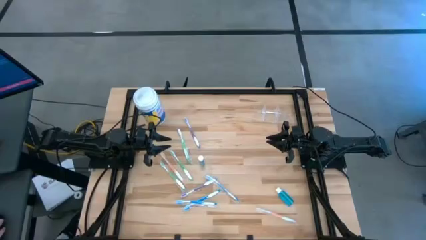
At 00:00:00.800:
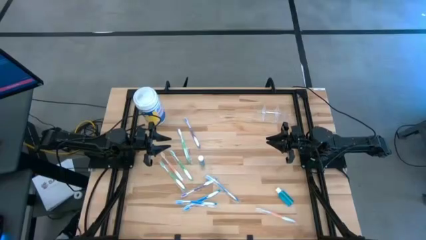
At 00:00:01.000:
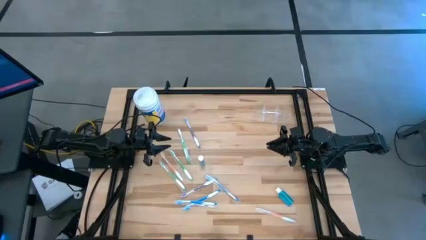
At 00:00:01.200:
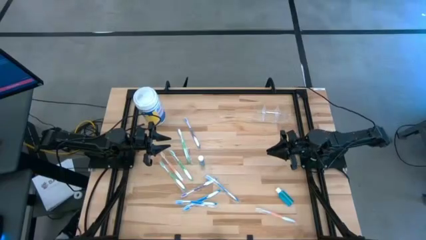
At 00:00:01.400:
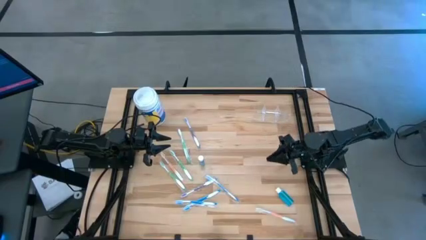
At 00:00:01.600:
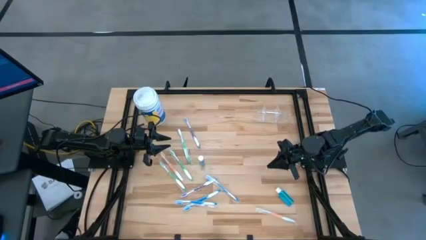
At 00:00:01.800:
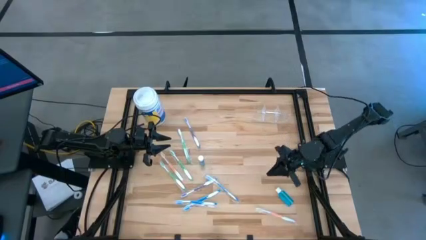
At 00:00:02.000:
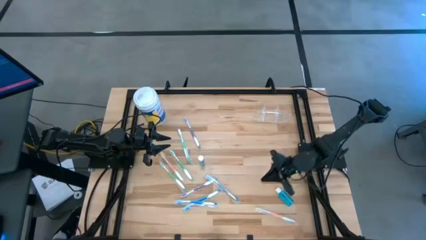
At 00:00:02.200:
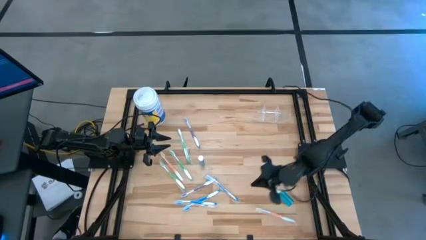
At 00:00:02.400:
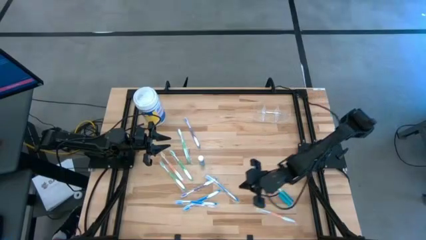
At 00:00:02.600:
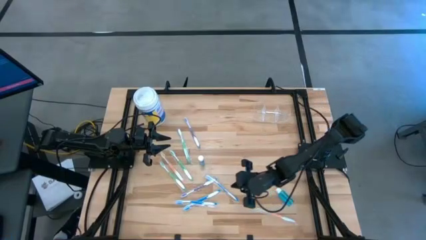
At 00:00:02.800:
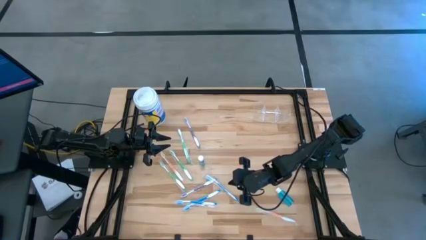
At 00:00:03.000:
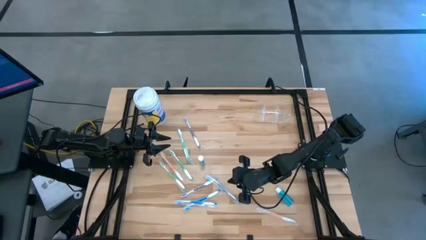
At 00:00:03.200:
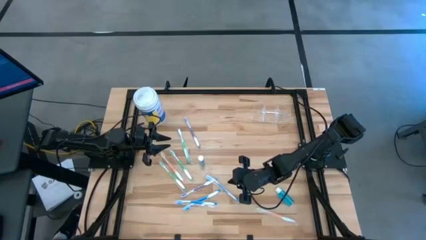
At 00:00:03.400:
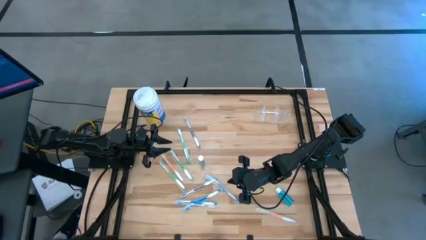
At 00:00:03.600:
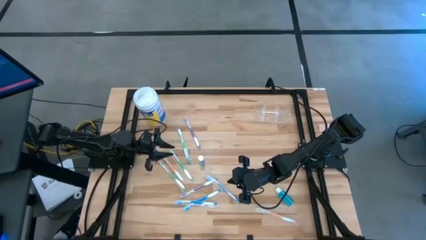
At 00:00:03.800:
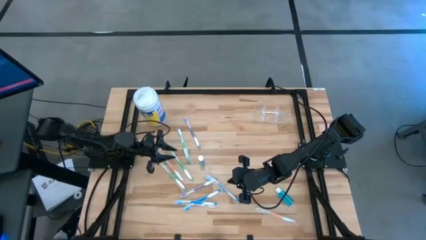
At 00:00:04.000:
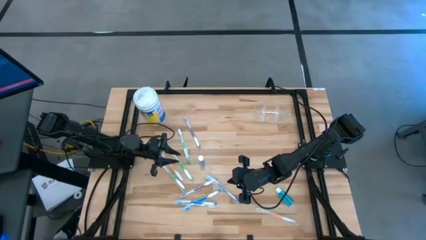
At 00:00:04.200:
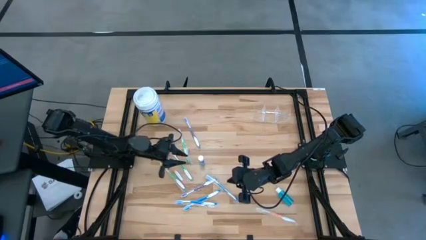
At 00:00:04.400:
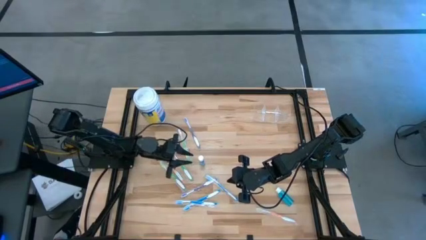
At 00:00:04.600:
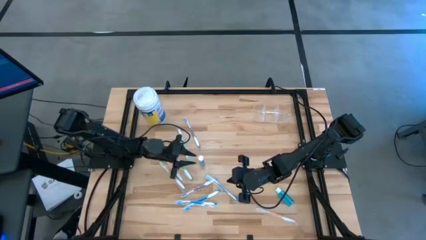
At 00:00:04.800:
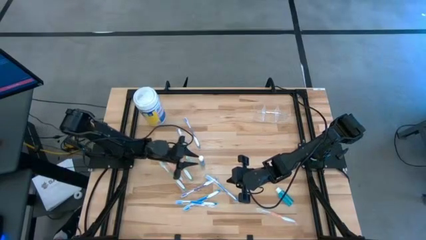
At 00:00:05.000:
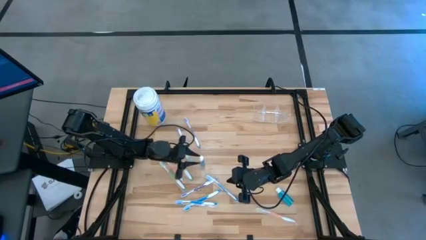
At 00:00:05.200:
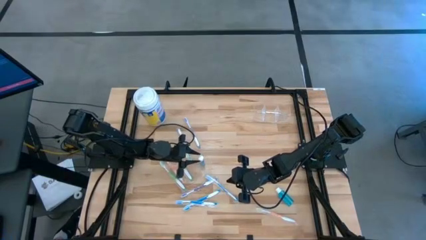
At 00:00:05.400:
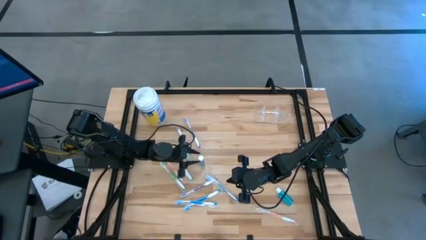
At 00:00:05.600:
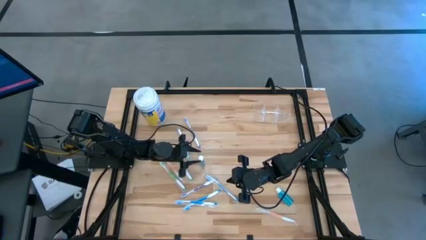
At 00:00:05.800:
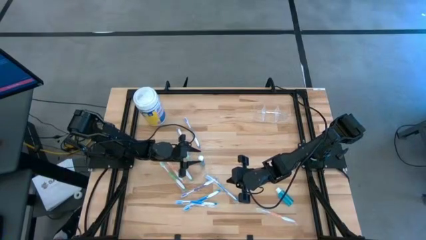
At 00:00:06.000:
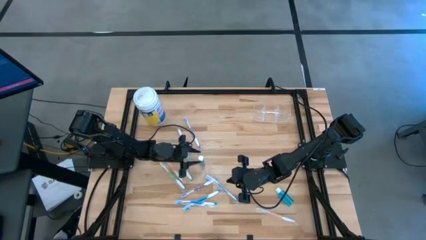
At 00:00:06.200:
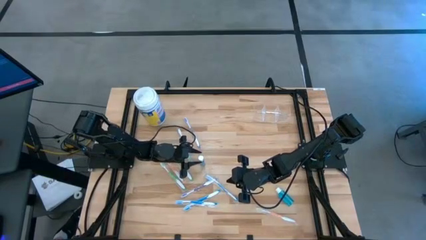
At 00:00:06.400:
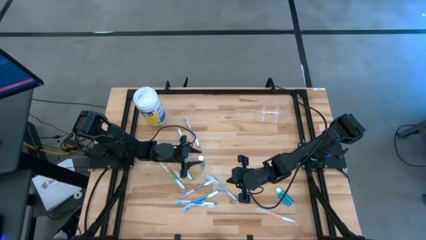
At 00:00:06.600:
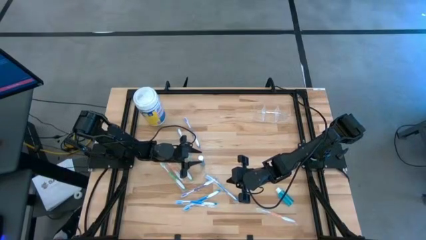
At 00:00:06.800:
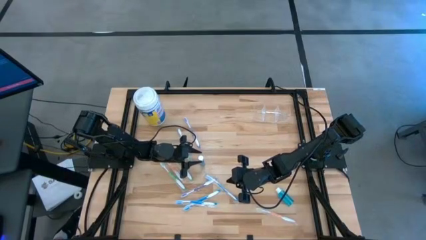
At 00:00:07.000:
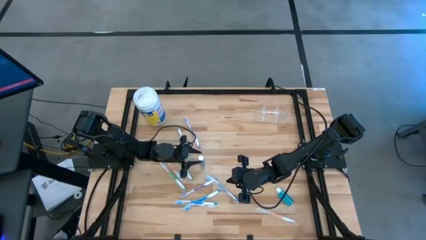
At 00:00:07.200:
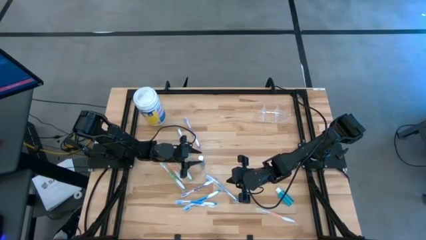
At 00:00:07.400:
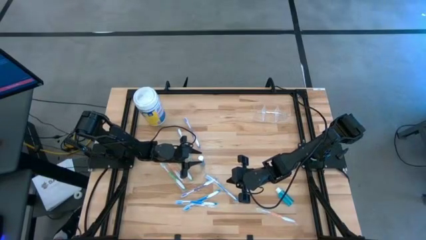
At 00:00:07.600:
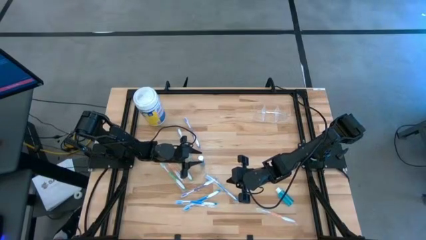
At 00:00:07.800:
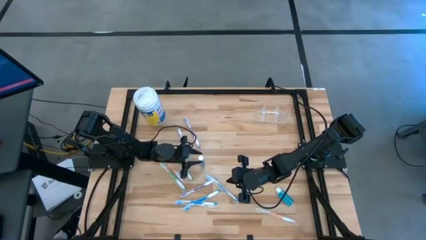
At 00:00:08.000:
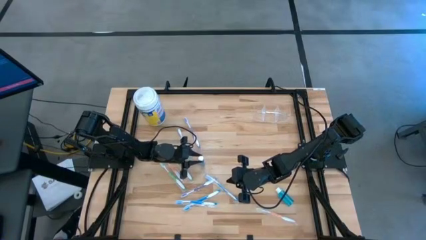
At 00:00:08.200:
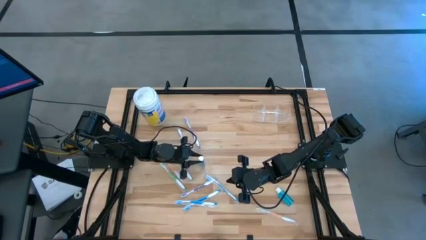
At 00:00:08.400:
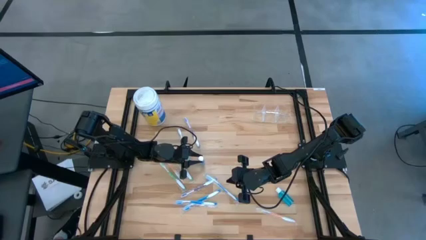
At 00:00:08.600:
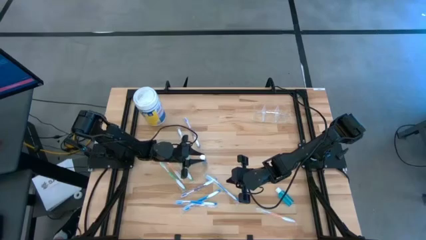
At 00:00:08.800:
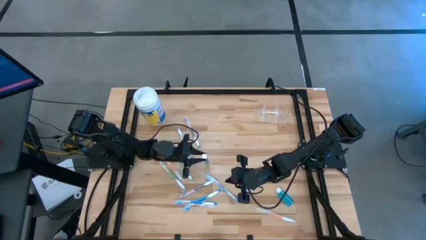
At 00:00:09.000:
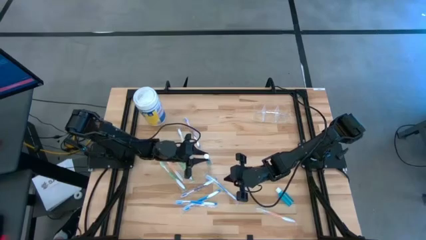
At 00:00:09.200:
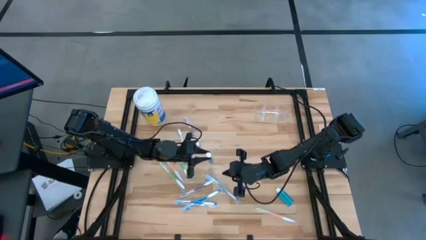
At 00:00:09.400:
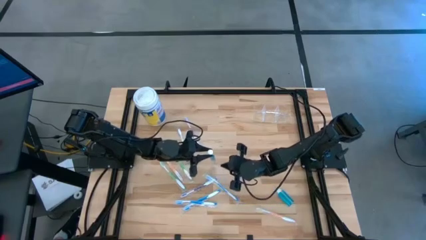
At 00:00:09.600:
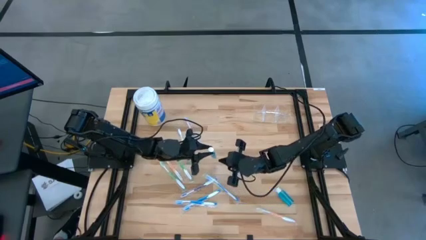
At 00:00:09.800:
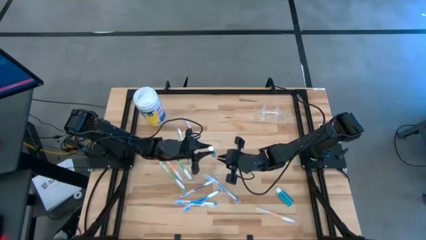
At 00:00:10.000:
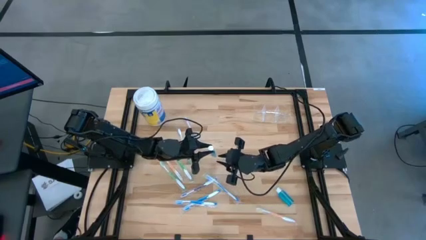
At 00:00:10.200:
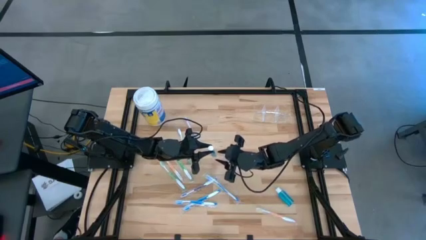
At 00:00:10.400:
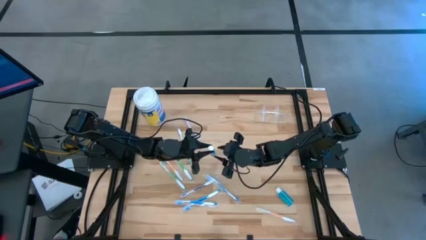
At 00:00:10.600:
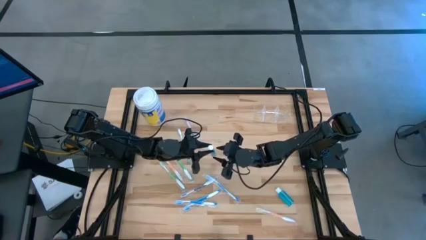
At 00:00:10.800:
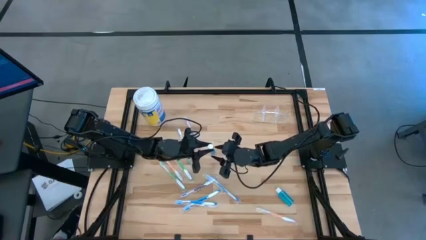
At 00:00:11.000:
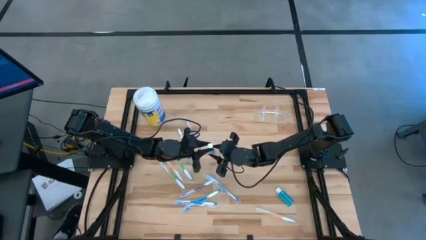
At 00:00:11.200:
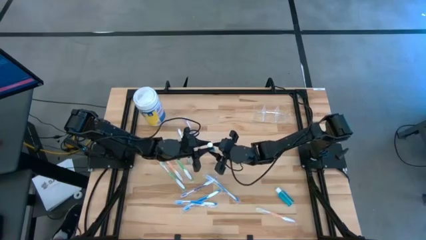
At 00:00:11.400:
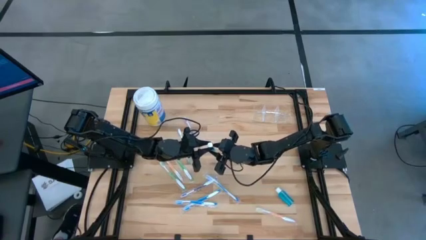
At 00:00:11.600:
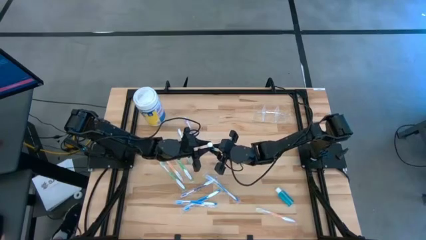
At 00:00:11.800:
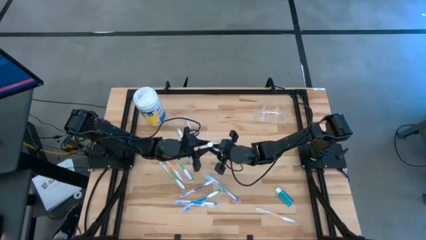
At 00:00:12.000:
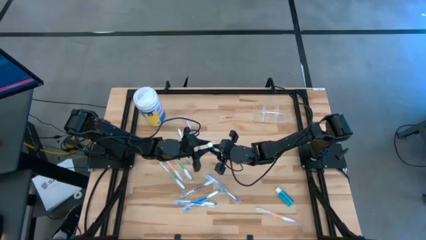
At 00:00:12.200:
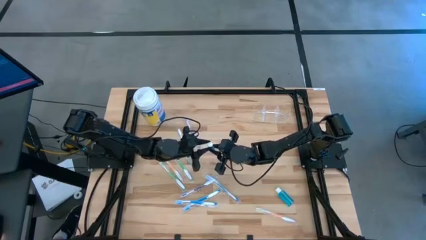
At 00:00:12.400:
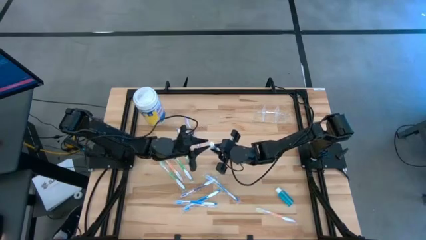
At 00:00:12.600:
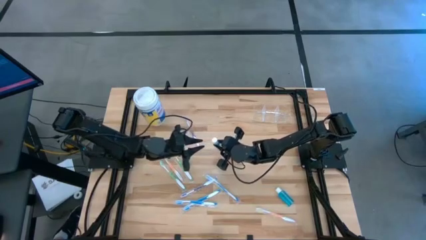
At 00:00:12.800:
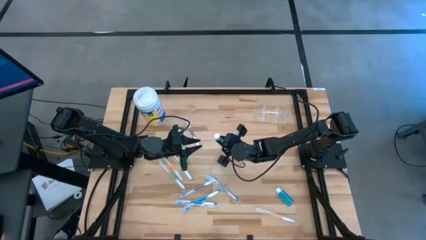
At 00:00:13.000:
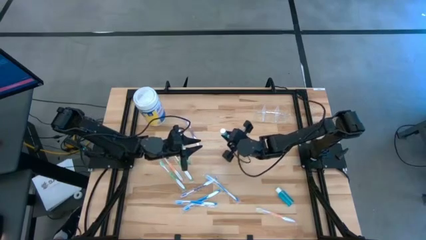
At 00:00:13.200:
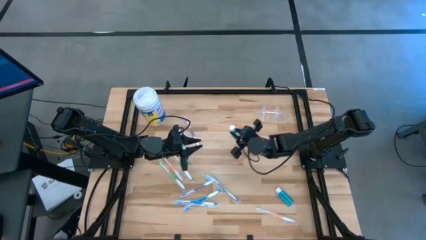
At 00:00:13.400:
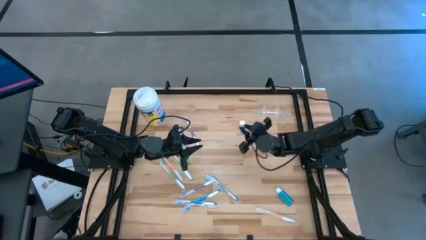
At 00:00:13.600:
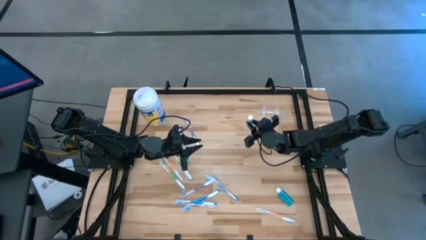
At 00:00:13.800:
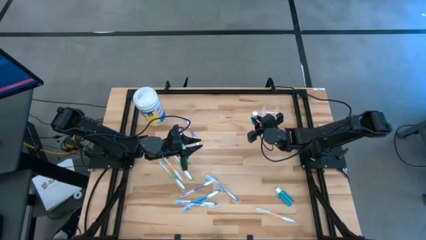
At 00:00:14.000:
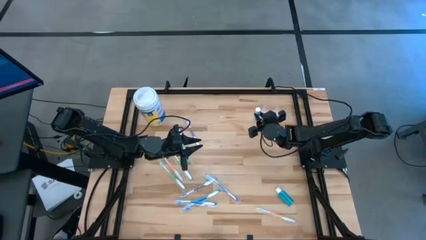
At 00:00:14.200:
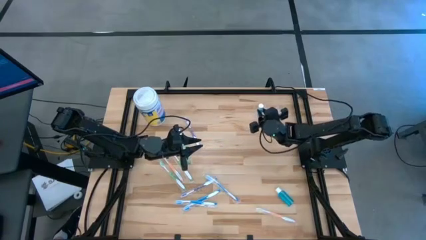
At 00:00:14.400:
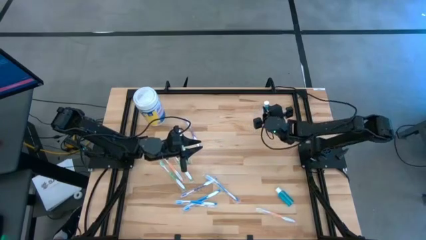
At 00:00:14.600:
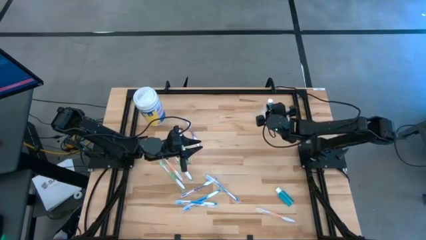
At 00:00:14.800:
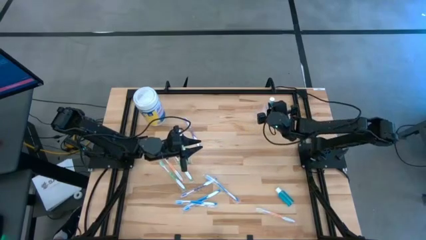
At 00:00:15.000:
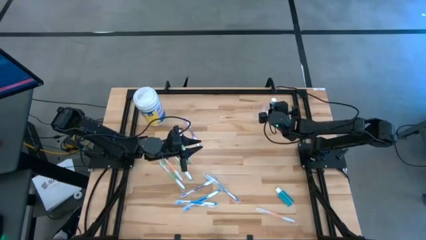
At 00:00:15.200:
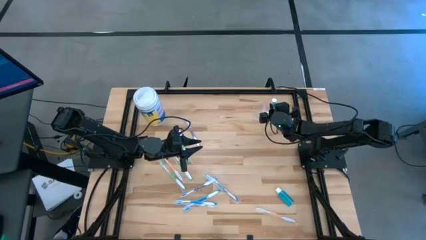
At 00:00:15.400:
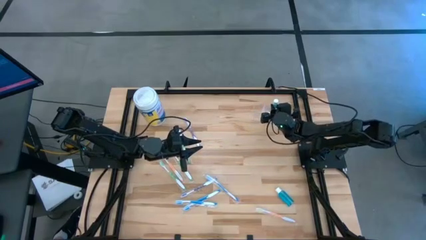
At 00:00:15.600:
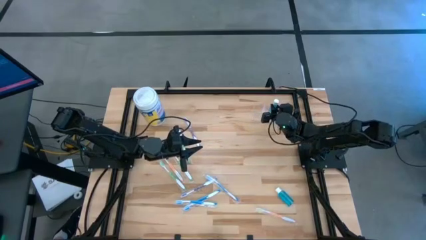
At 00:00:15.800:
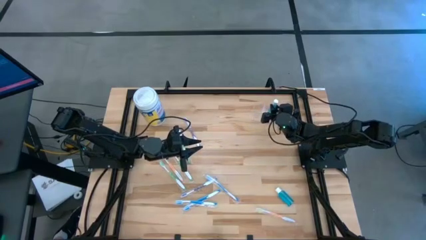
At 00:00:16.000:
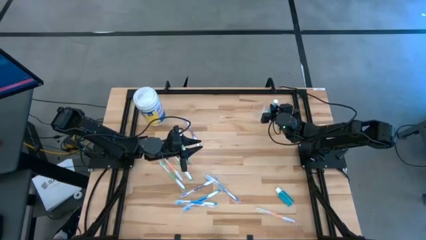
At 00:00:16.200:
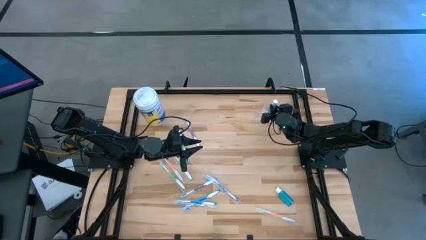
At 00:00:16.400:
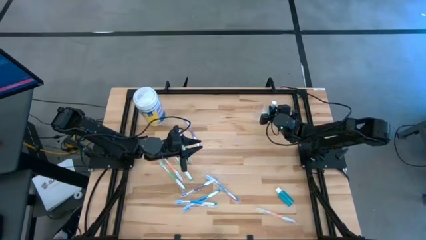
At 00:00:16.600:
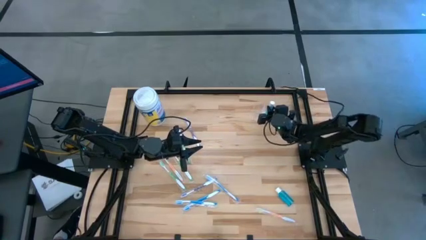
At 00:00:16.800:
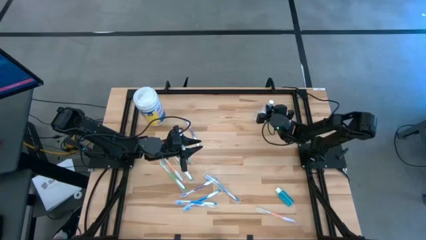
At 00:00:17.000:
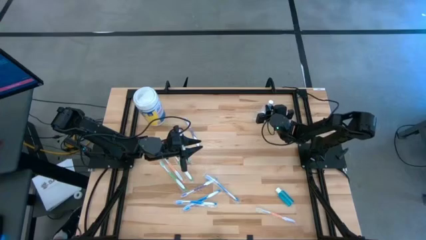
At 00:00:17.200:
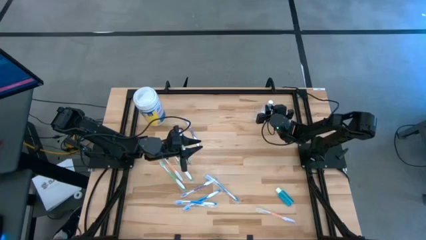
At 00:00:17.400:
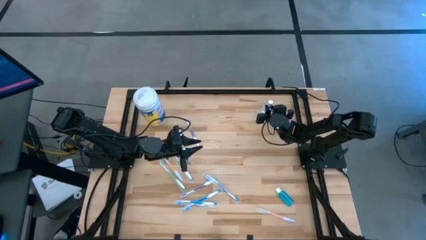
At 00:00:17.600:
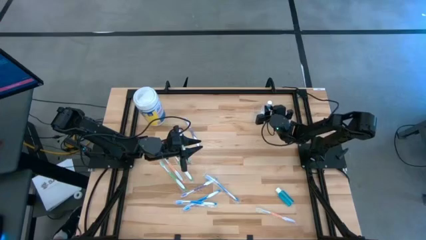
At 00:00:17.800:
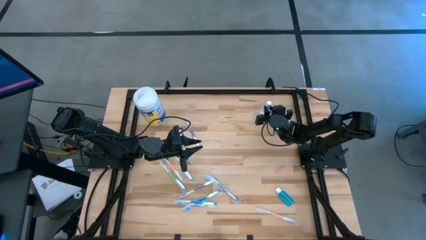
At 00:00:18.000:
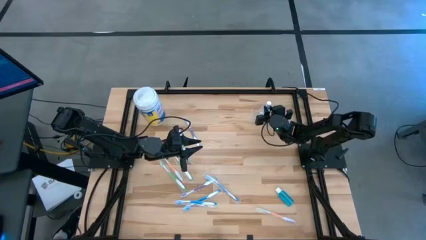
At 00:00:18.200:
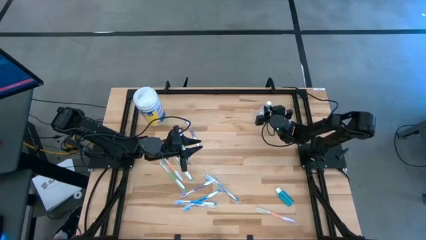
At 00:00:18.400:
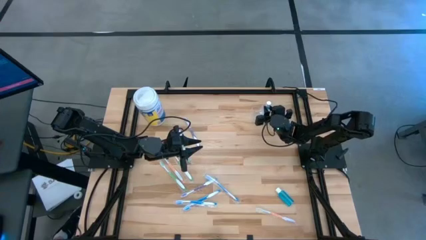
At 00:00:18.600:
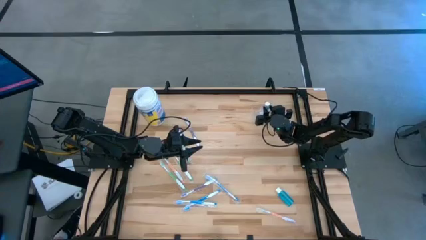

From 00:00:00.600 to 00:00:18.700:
Task: Pick & Place toothbrushing station
Put the left mouthwash into the middle transparent organizer
